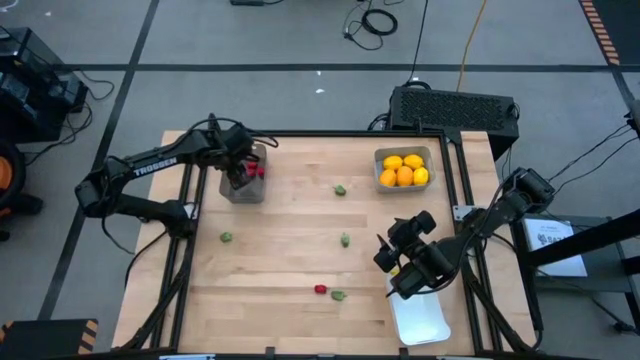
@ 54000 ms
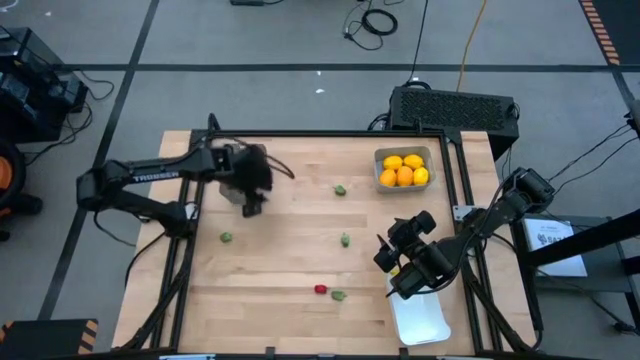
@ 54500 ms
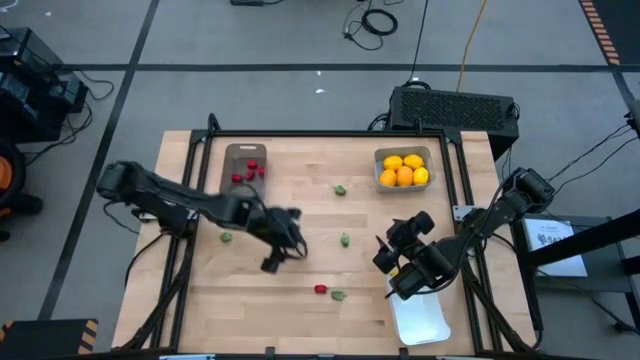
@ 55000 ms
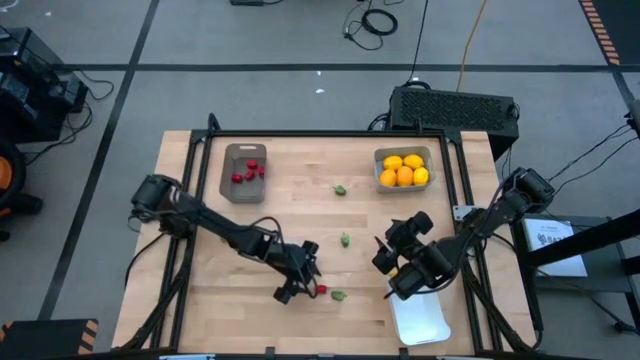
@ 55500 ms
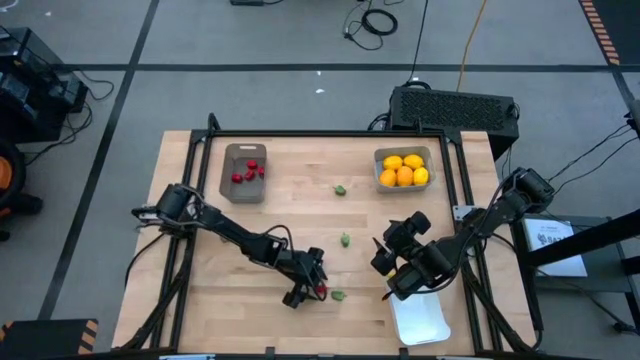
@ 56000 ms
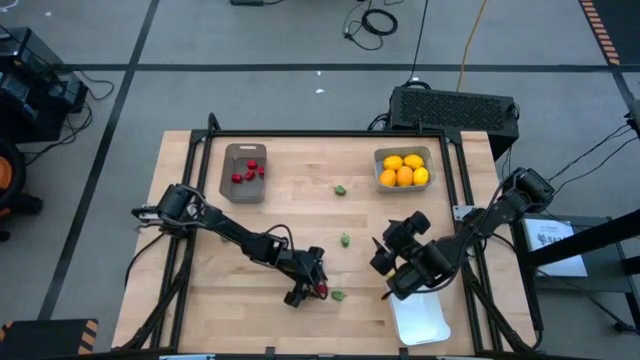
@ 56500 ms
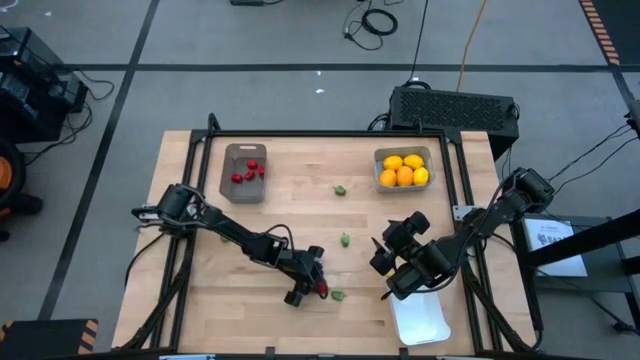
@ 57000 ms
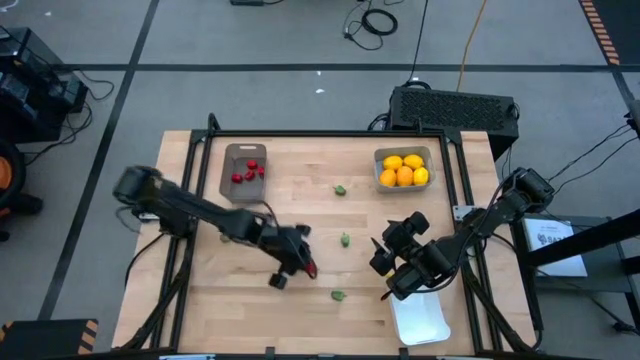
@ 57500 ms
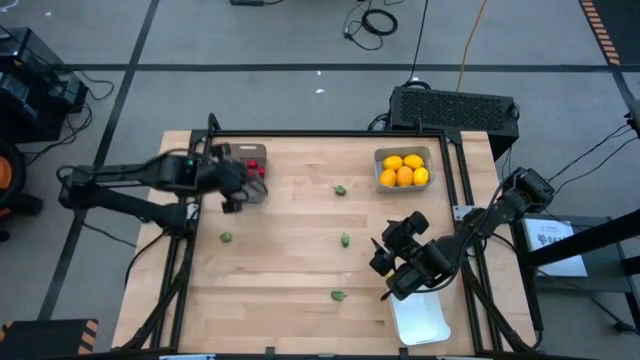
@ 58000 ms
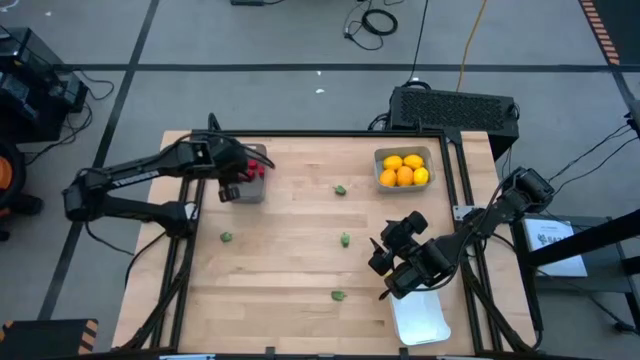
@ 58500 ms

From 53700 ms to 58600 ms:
Task: Sort produce into baskets
Put the red chili pepper into the black bin

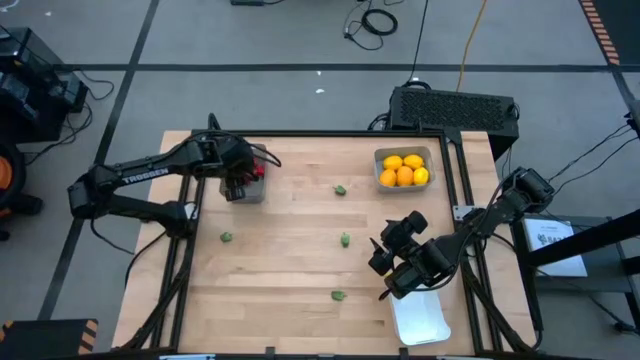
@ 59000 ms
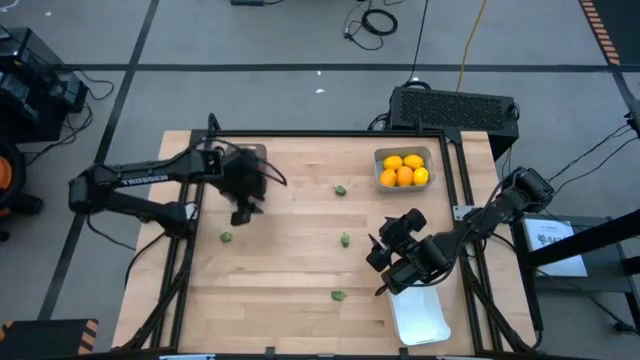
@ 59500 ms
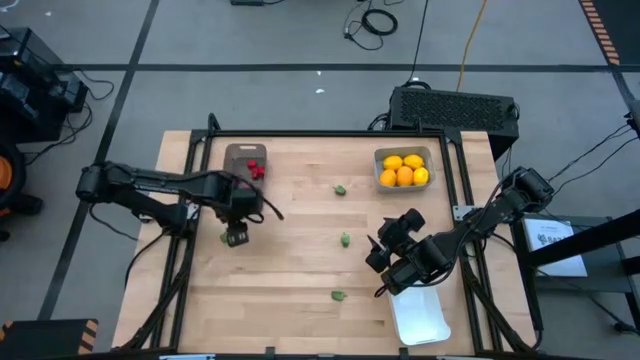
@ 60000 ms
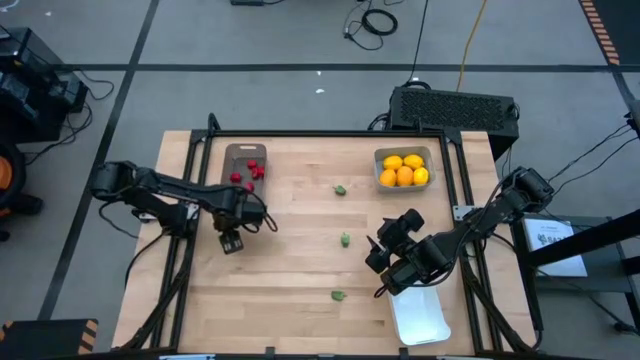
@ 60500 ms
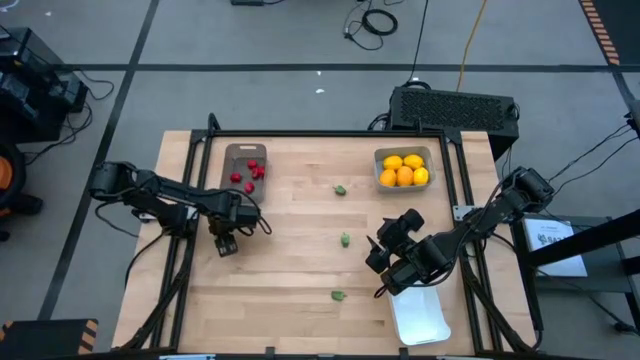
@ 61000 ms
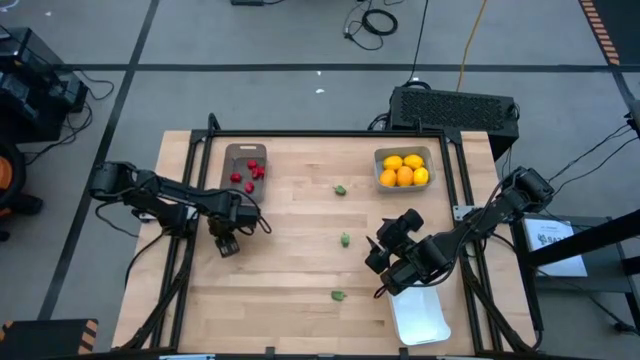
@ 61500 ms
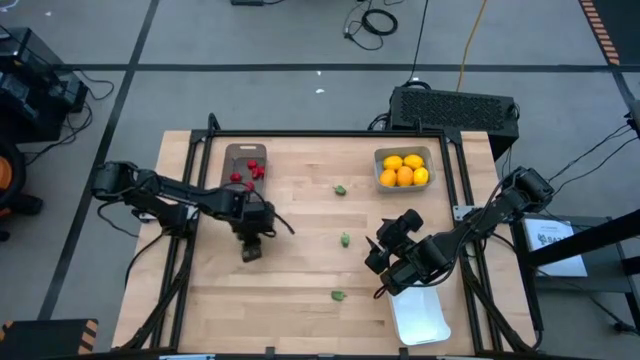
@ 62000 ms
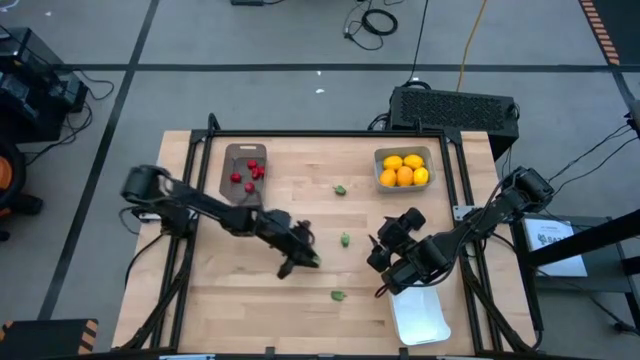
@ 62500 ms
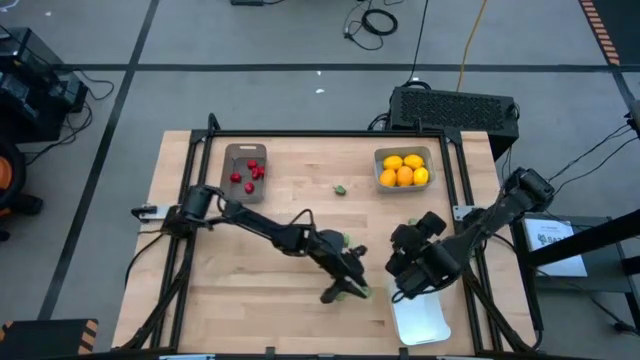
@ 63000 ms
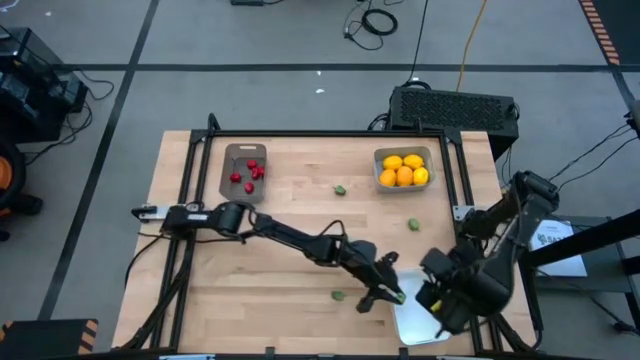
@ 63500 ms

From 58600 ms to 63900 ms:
Put the middle left green chili pepper into the white bin

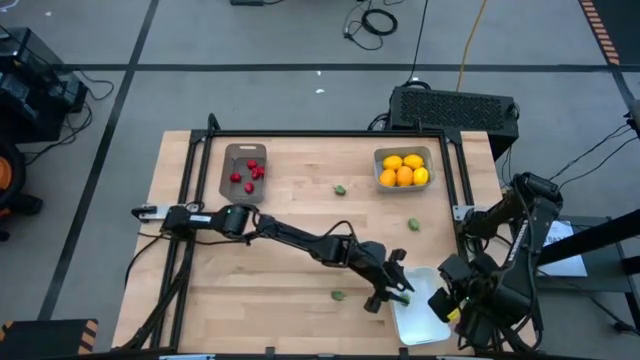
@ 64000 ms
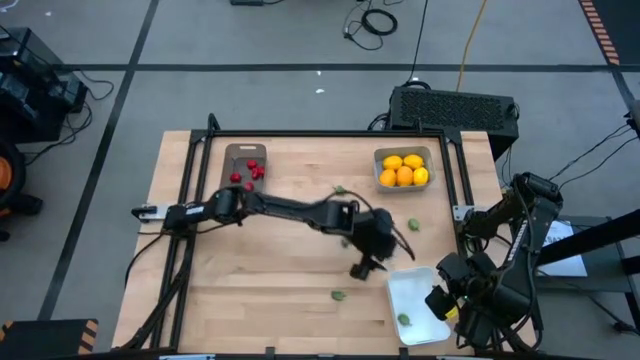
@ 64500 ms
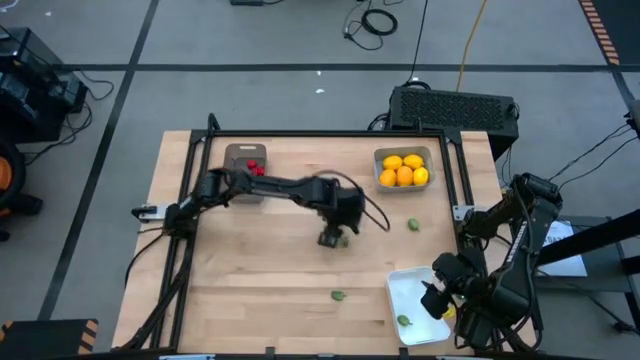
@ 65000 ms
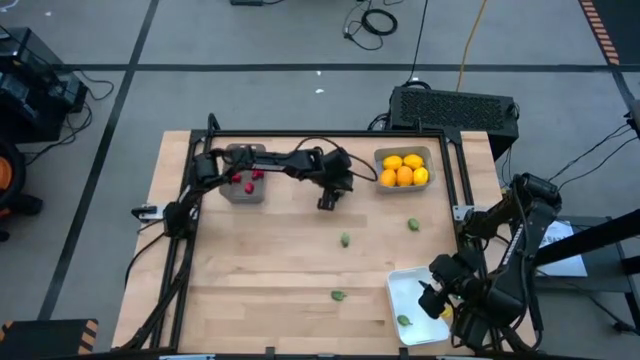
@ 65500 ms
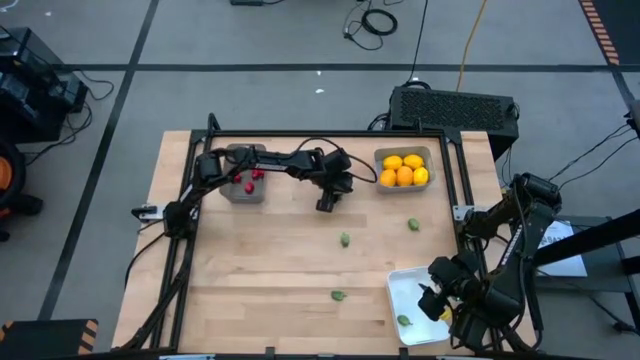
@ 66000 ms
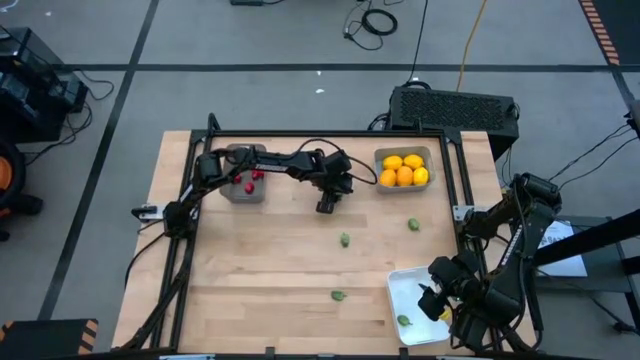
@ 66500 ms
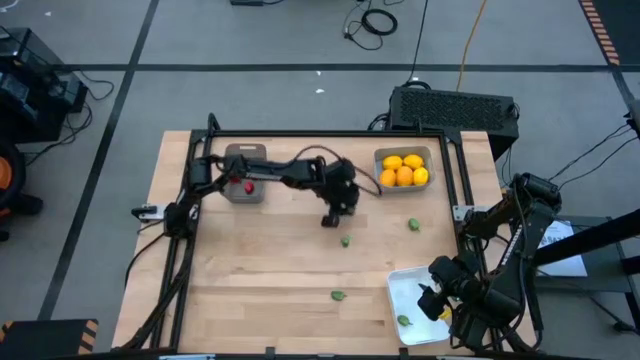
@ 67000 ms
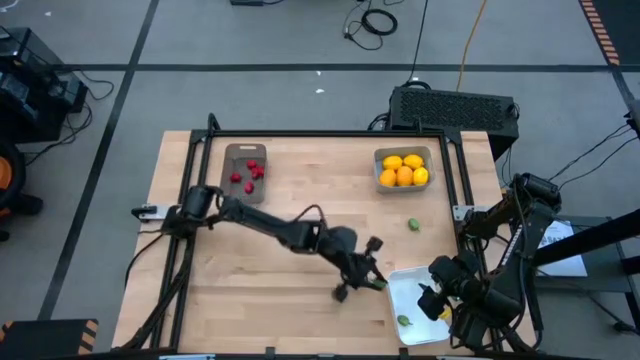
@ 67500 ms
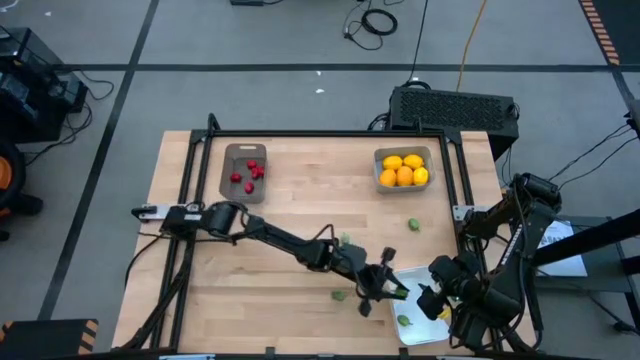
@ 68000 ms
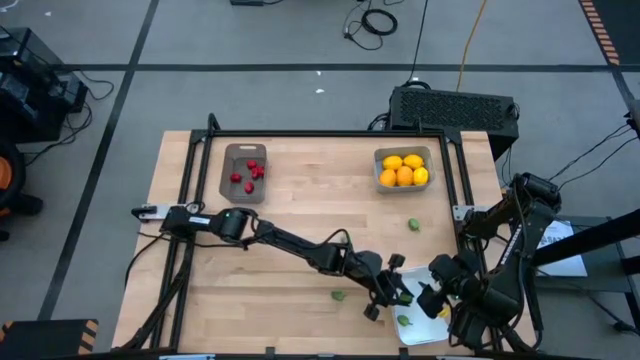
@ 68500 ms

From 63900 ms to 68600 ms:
Put the center top green chili pepper into the white bin

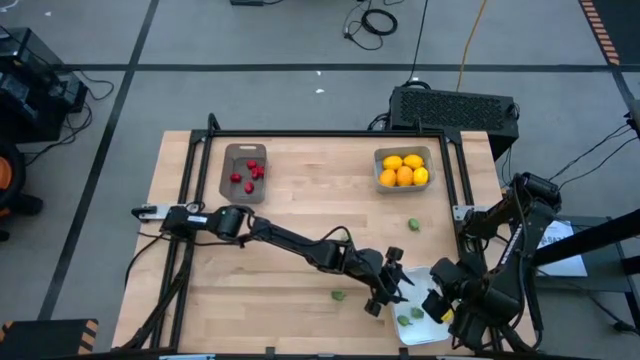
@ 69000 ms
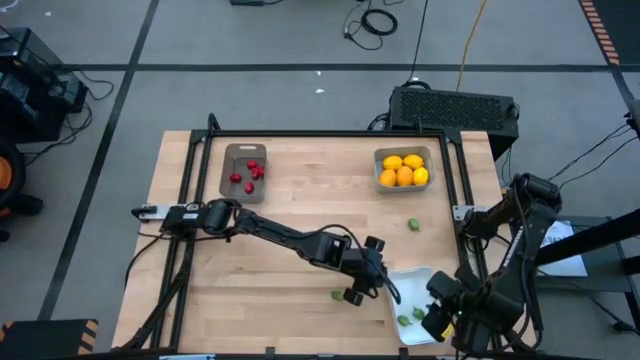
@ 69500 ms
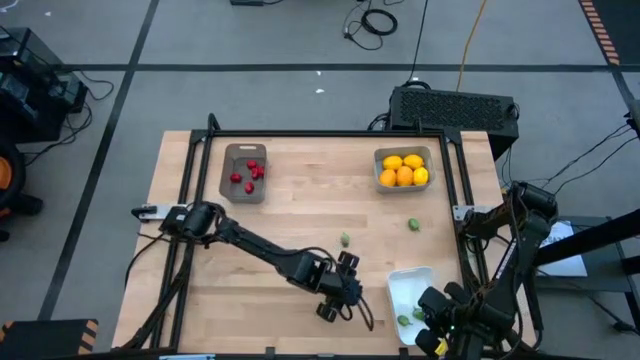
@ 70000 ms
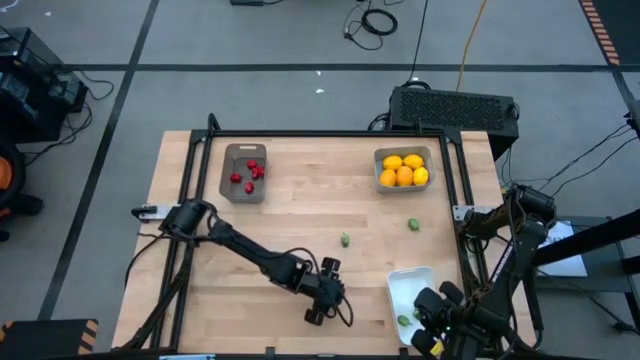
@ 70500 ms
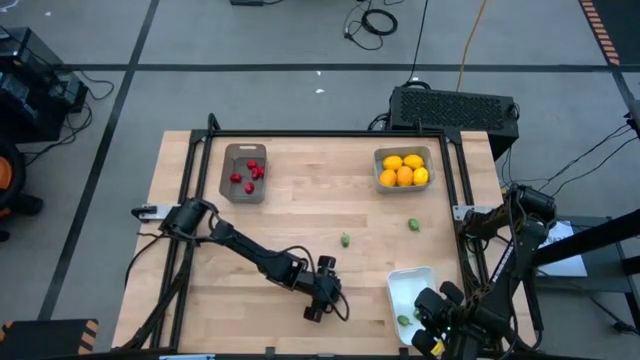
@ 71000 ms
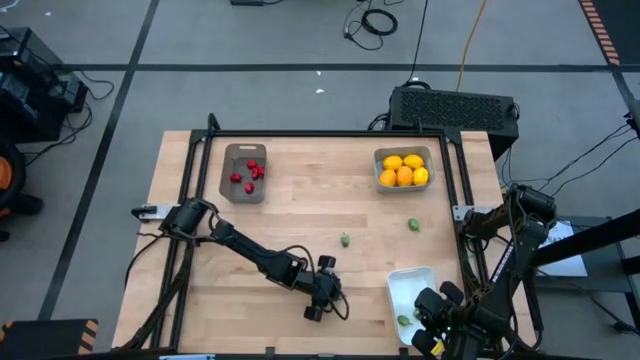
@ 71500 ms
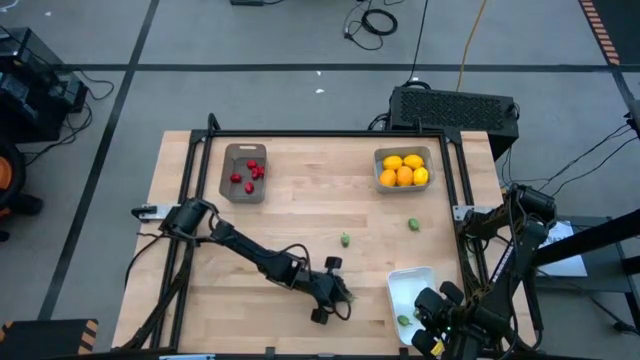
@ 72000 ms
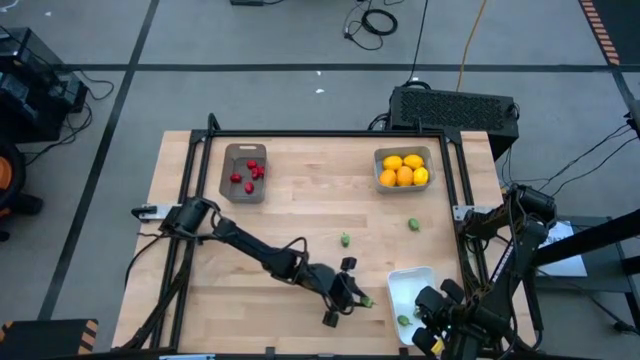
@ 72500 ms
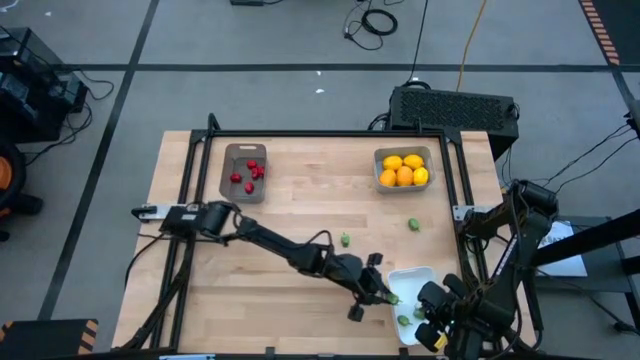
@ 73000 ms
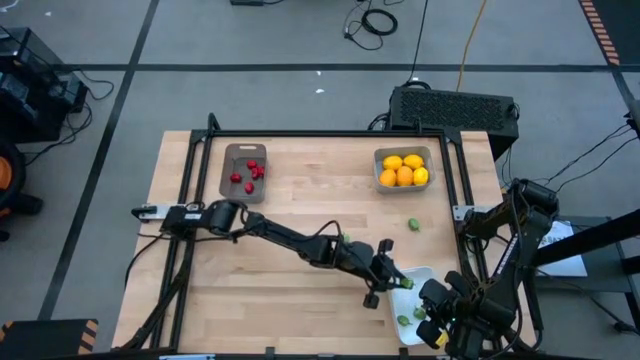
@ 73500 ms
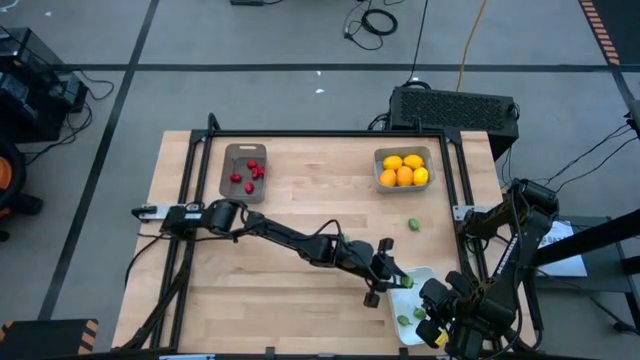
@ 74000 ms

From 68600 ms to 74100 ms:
Put the center bottom green chili pepper into the white bin
